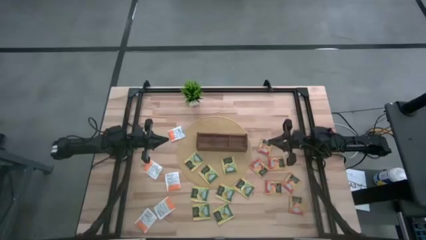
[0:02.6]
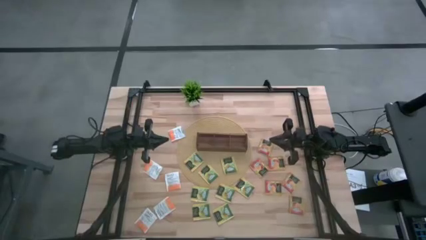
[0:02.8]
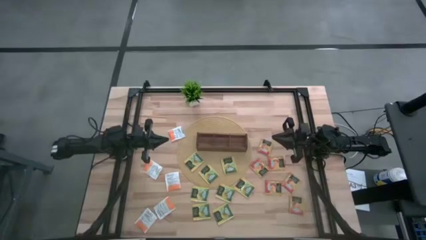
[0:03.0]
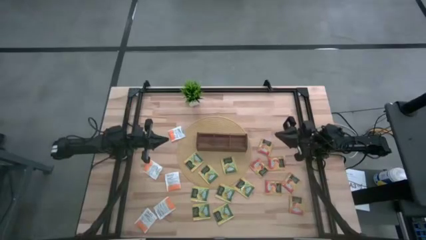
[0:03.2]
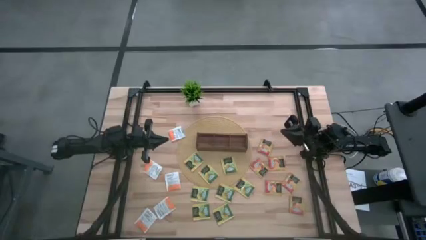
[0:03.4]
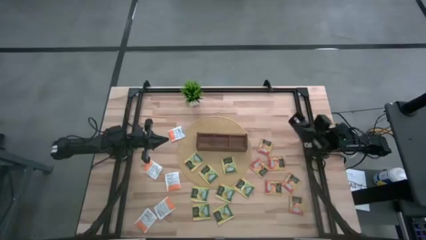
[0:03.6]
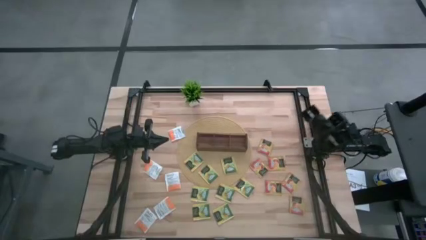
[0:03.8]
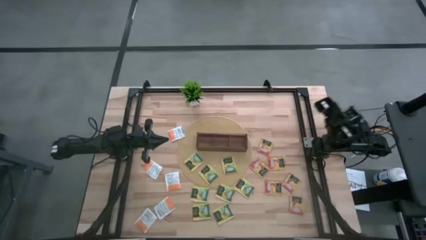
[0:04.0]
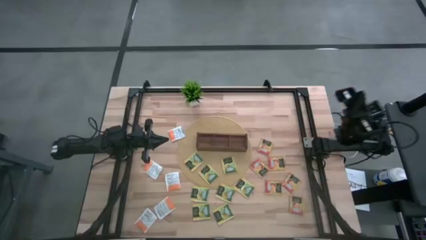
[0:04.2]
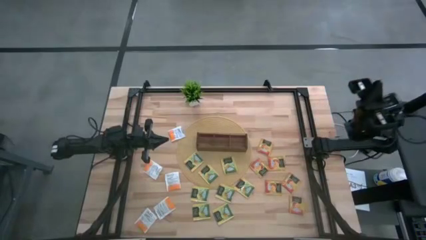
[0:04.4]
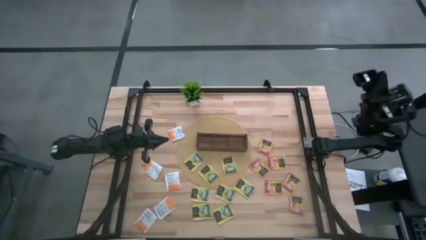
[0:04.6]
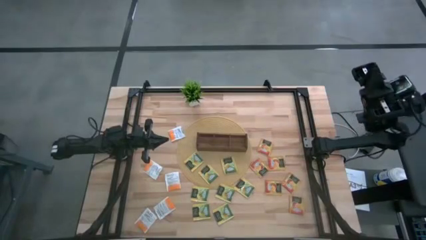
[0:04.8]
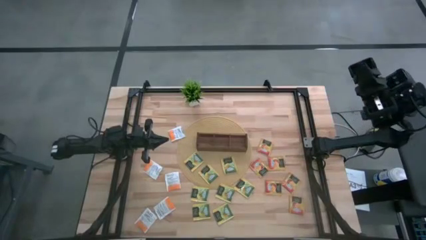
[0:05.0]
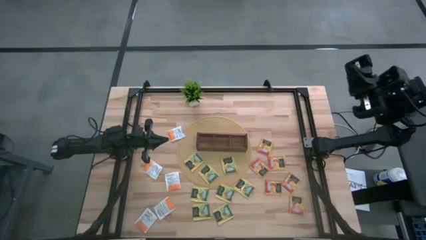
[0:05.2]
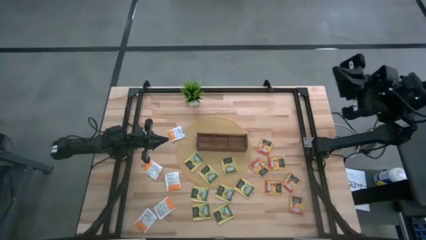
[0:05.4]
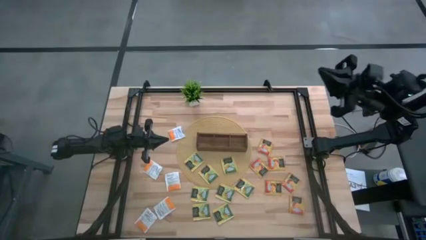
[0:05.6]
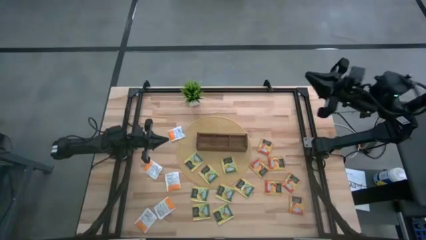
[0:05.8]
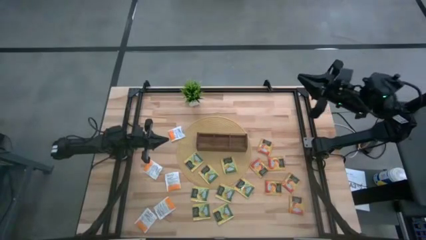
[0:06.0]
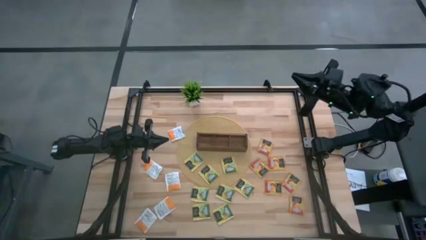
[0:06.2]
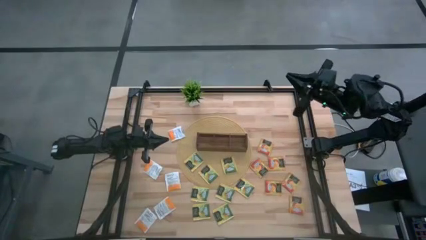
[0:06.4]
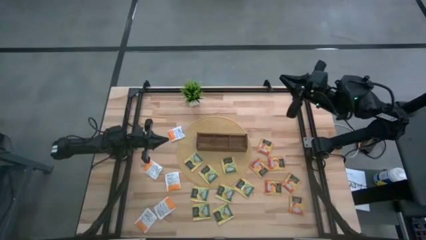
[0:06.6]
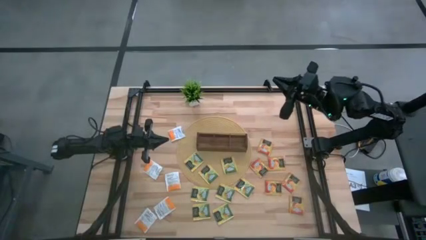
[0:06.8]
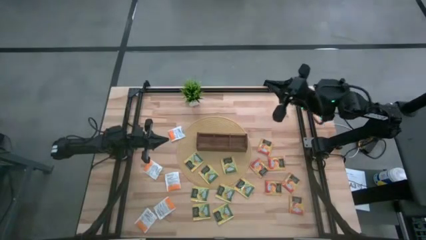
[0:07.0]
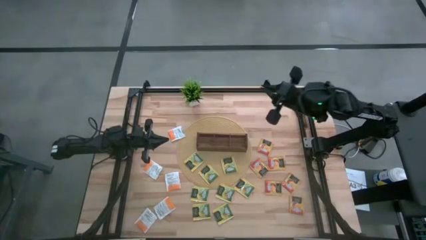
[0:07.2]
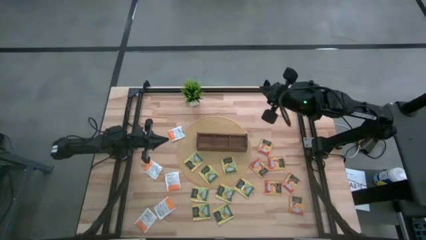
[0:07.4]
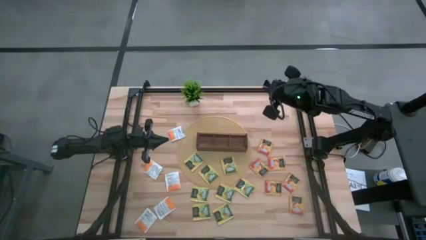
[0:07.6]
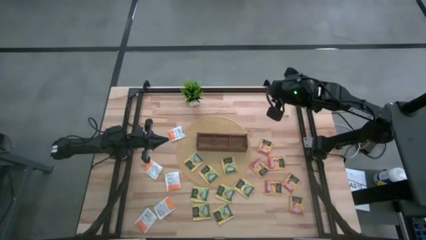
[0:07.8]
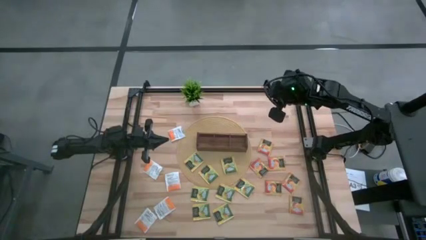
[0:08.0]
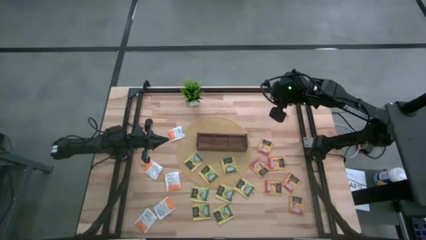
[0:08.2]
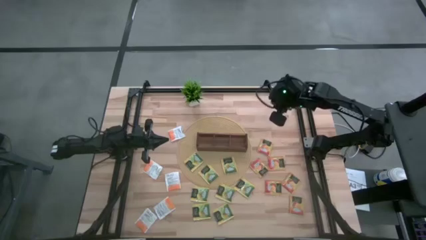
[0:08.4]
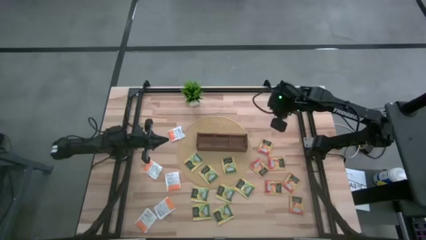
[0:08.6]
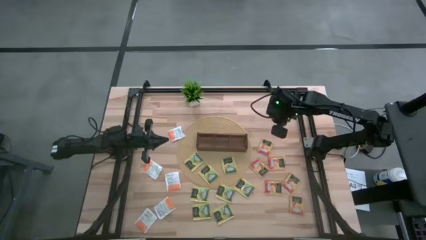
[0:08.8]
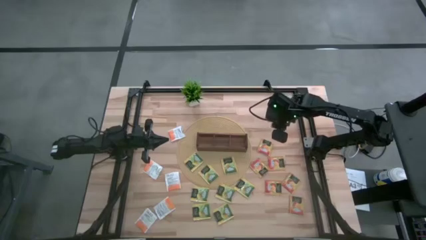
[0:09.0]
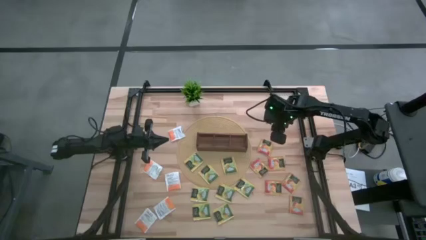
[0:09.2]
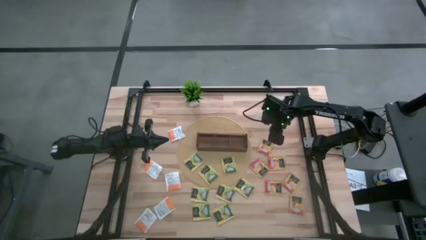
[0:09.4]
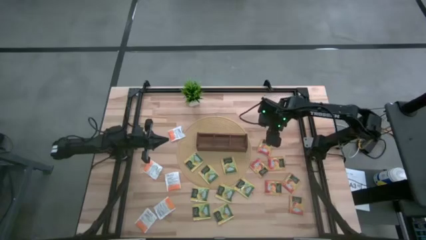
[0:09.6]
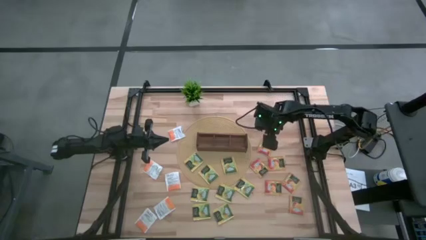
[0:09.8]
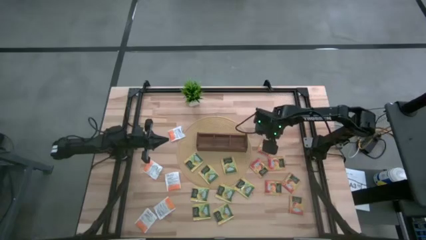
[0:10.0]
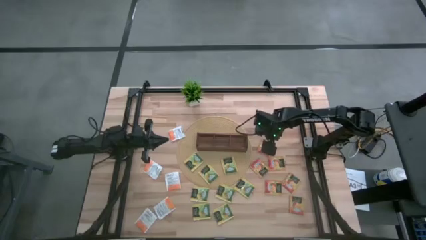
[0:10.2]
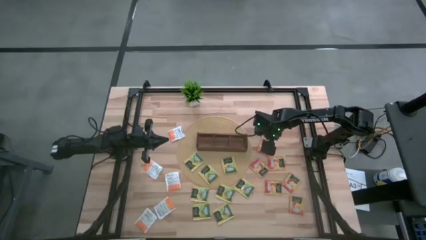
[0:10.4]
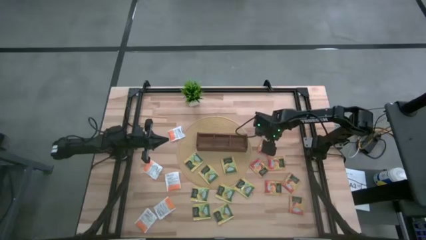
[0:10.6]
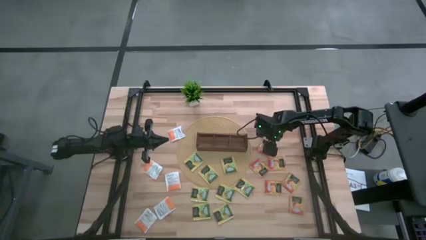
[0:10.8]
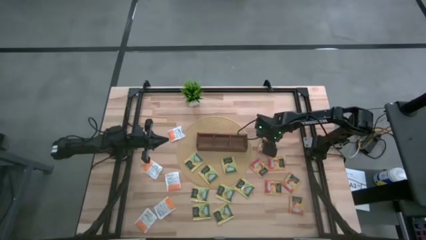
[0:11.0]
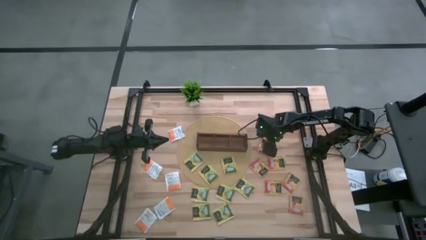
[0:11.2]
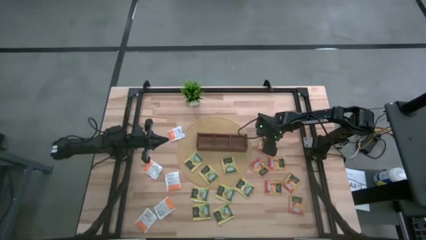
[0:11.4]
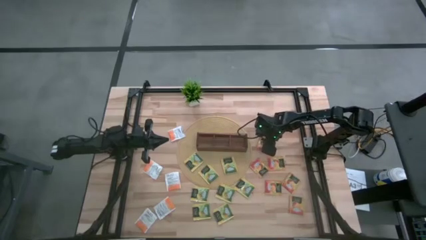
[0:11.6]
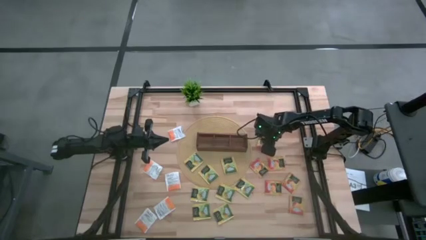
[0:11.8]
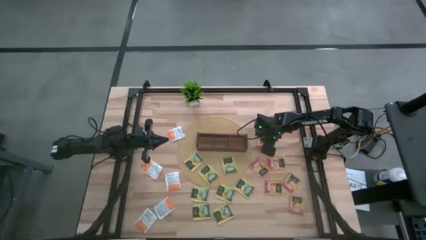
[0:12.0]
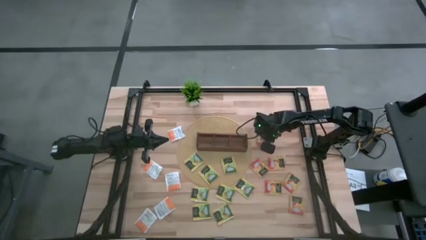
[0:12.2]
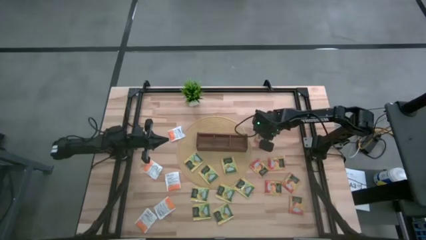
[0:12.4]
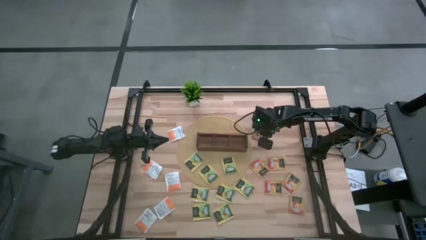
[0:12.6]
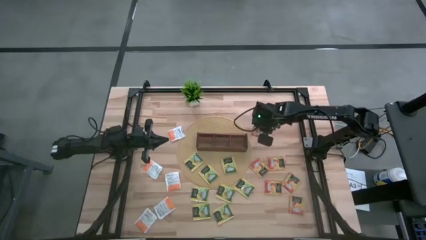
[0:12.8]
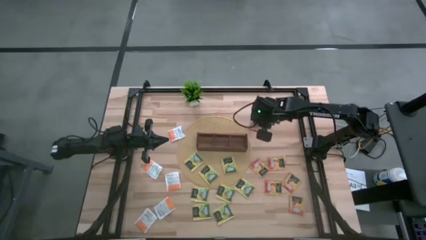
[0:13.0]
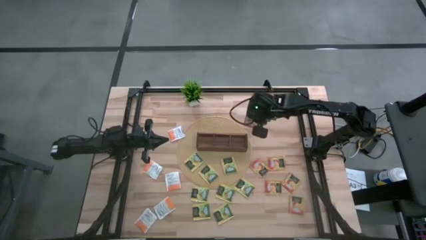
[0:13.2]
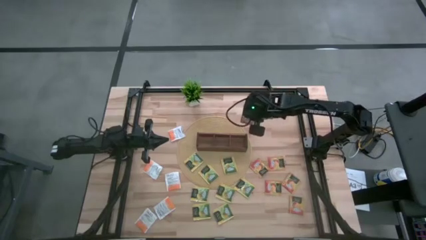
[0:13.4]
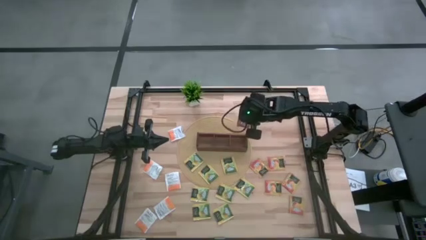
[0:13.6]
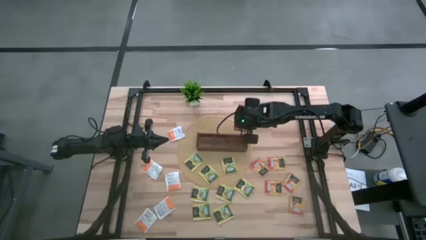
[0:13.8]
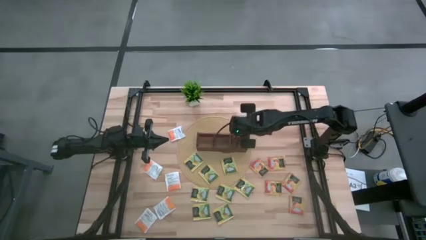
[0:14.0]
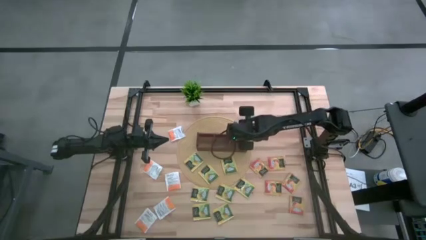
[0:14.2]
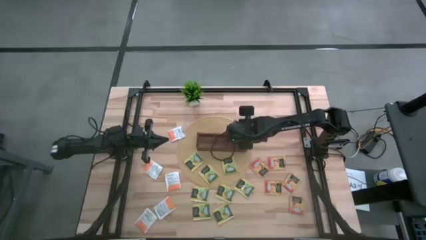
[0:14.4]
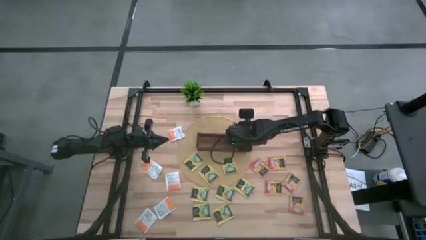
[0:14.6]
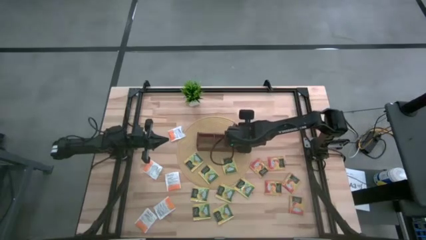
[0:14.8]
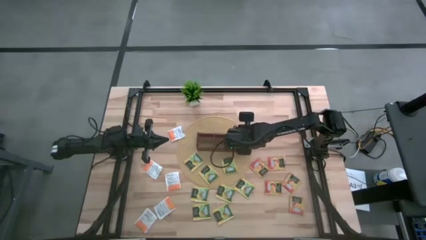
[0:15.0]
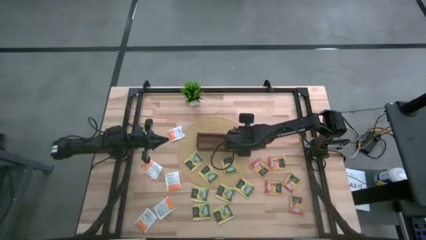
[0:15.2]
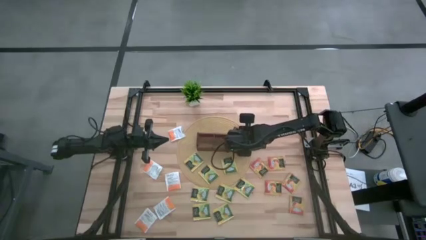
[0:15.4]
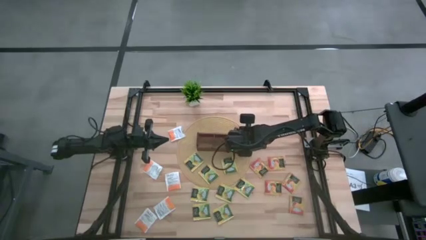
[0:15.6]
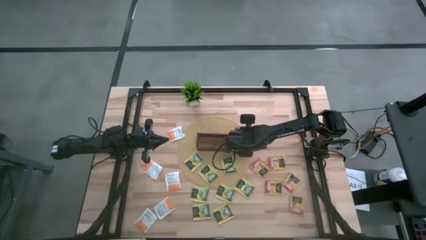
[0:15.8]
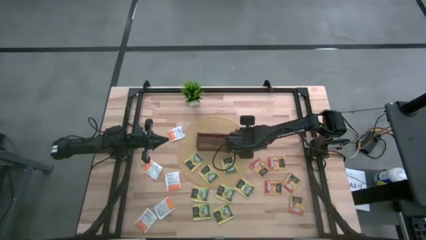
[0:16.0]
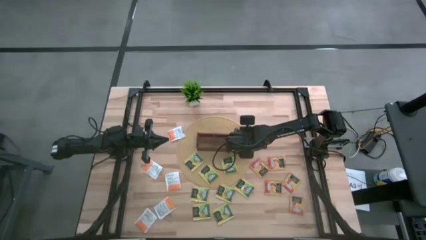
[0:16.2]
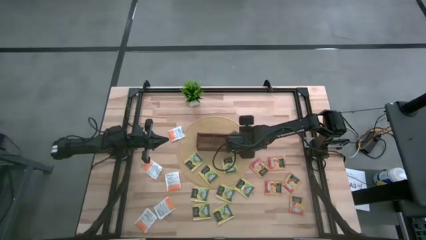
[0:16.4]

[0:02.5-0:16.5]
Task: Pick & Place Tea
Put the orange tea bag into the right section of the wooden organizer
